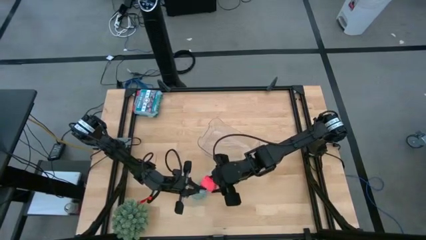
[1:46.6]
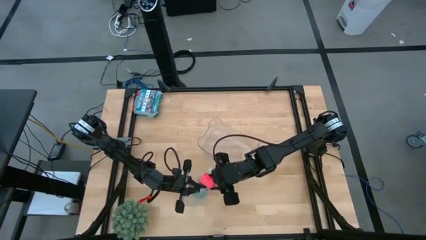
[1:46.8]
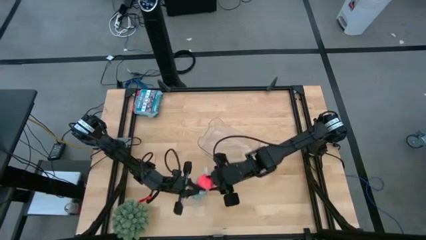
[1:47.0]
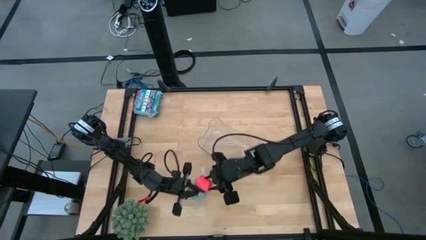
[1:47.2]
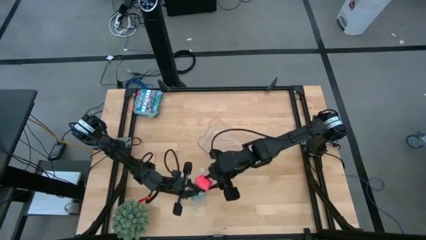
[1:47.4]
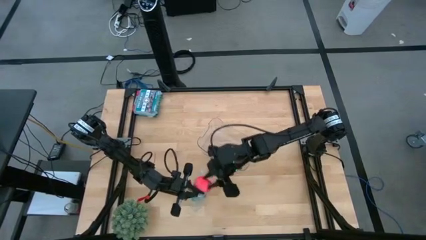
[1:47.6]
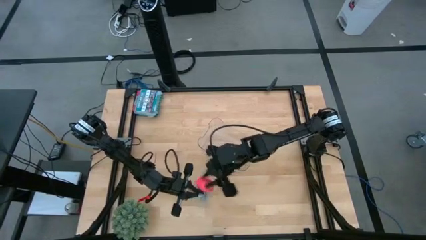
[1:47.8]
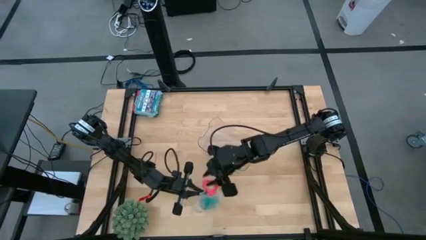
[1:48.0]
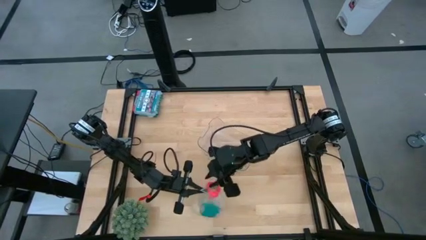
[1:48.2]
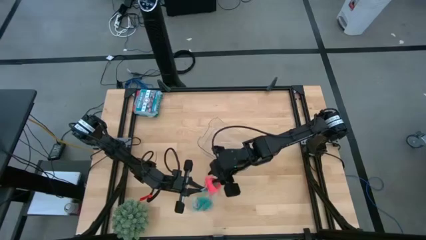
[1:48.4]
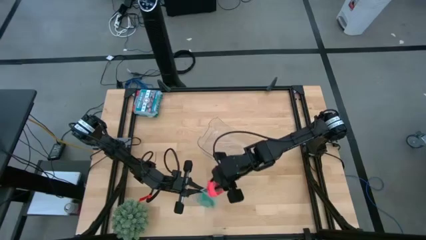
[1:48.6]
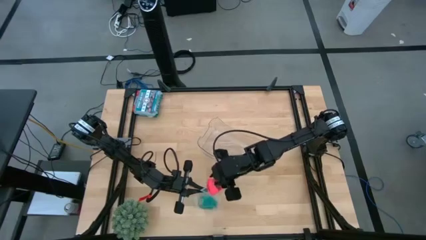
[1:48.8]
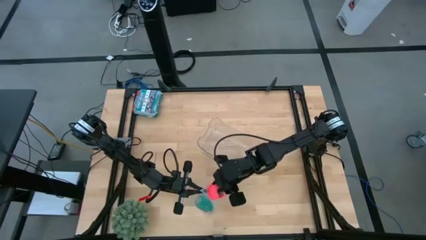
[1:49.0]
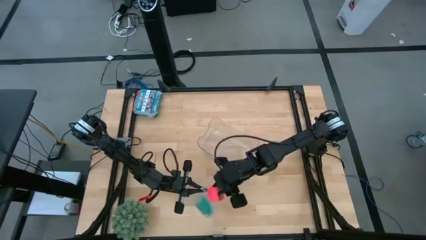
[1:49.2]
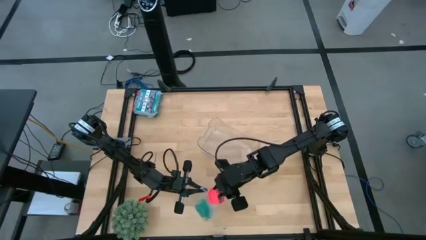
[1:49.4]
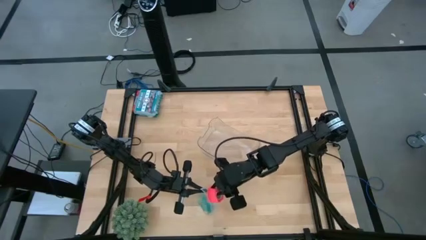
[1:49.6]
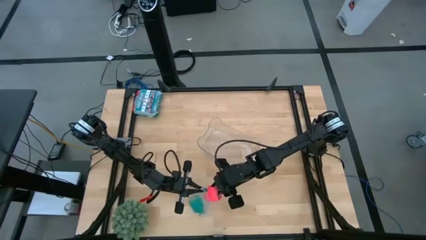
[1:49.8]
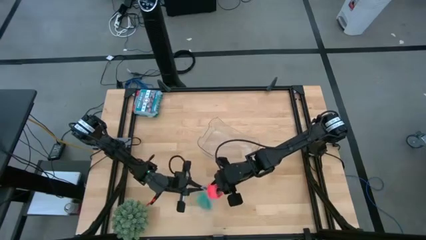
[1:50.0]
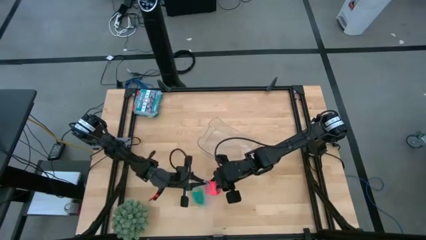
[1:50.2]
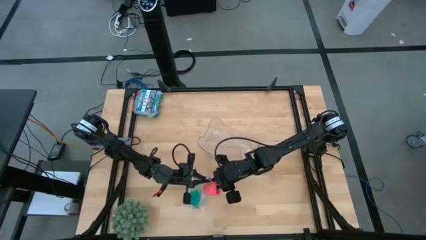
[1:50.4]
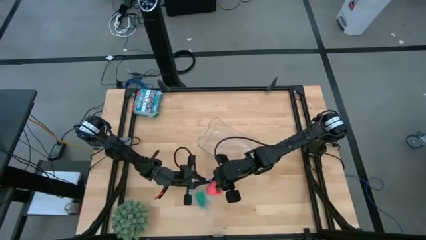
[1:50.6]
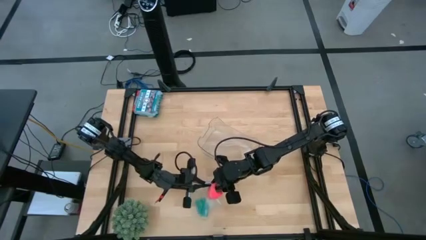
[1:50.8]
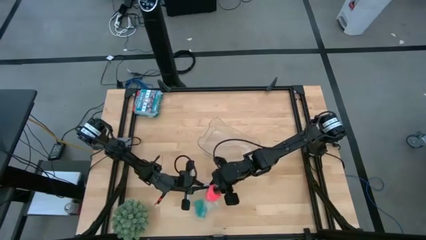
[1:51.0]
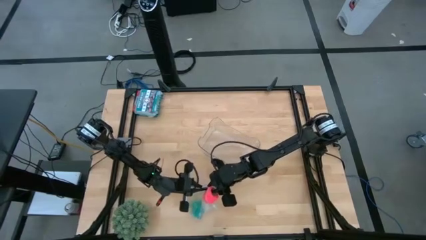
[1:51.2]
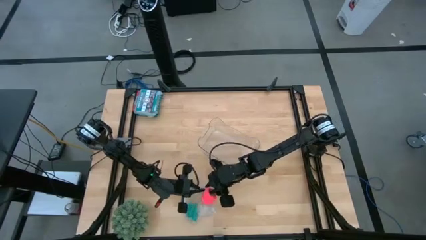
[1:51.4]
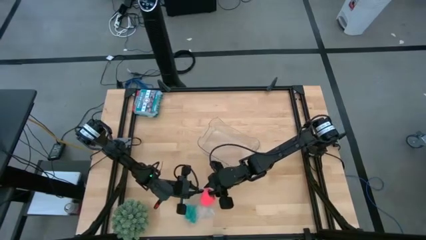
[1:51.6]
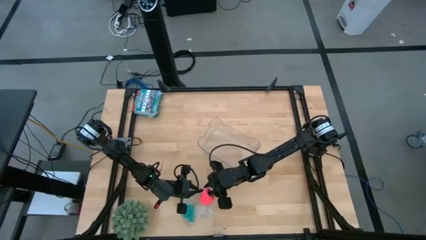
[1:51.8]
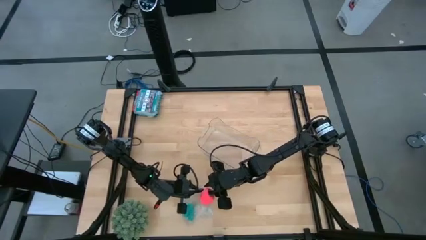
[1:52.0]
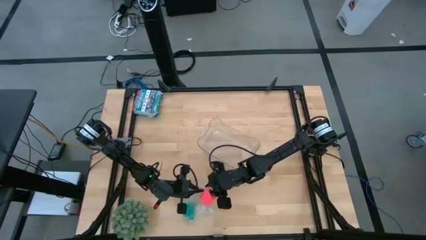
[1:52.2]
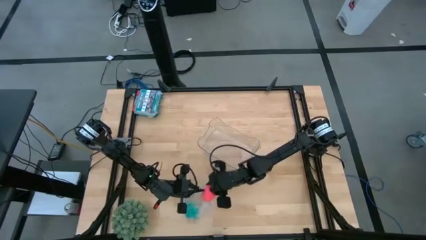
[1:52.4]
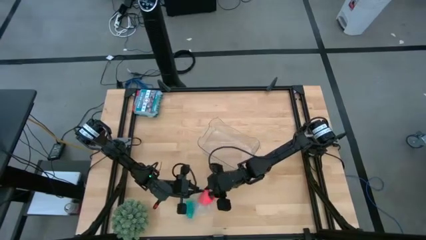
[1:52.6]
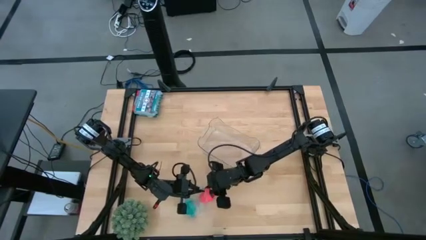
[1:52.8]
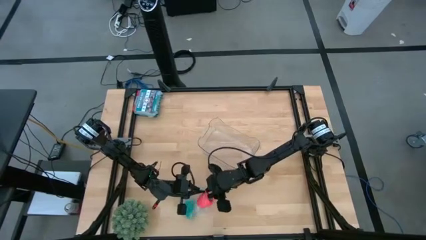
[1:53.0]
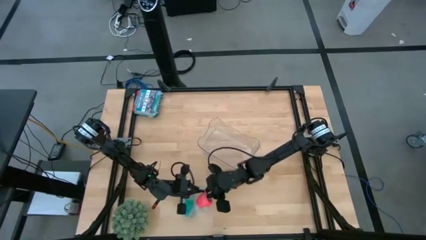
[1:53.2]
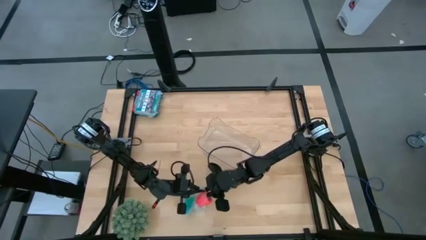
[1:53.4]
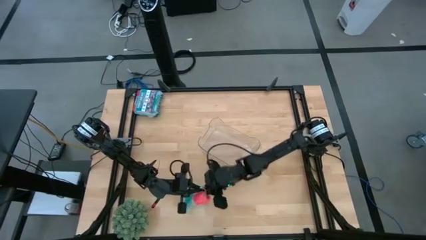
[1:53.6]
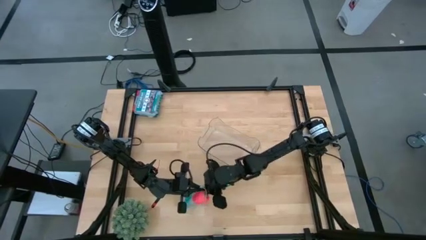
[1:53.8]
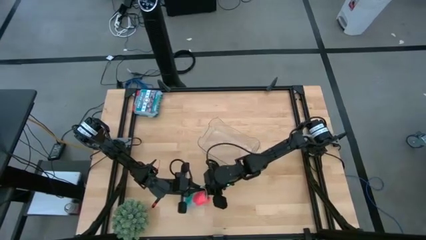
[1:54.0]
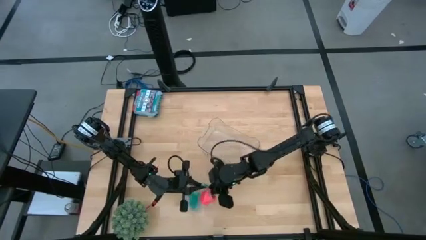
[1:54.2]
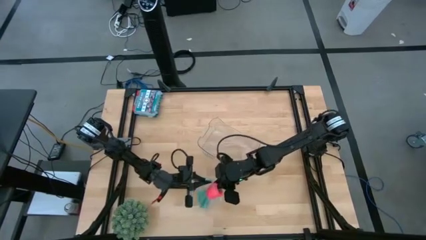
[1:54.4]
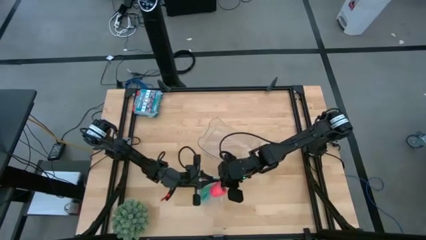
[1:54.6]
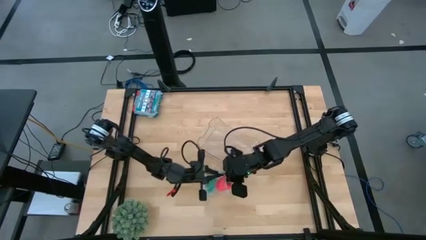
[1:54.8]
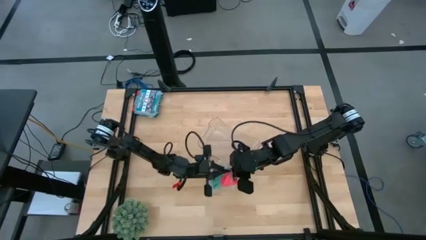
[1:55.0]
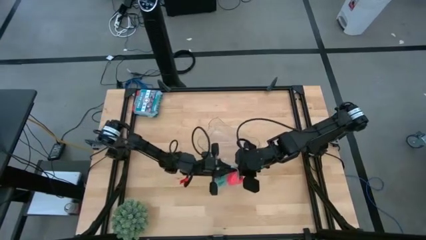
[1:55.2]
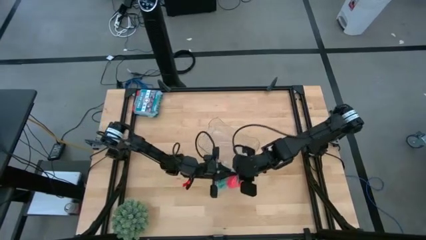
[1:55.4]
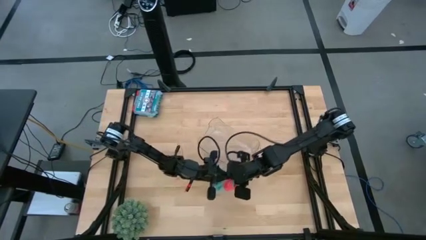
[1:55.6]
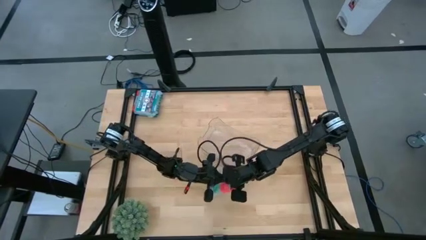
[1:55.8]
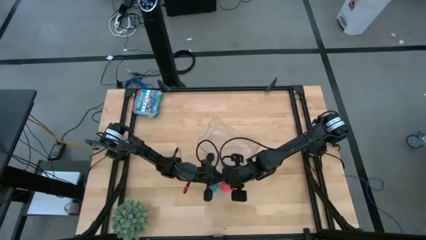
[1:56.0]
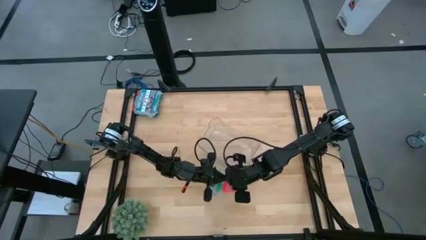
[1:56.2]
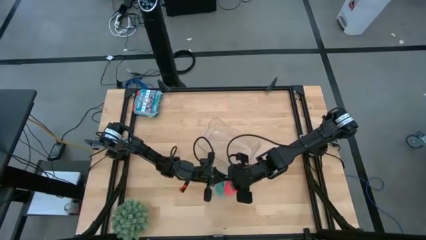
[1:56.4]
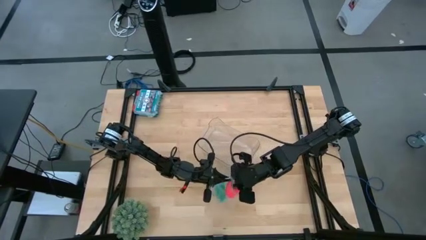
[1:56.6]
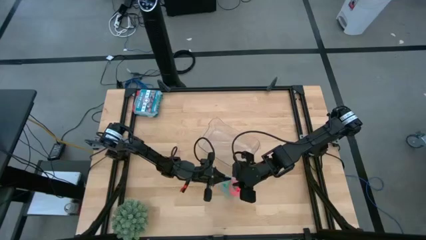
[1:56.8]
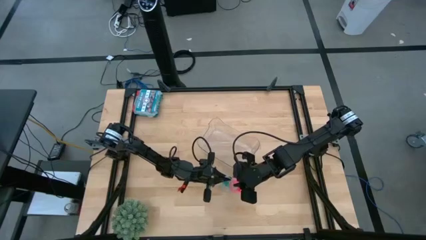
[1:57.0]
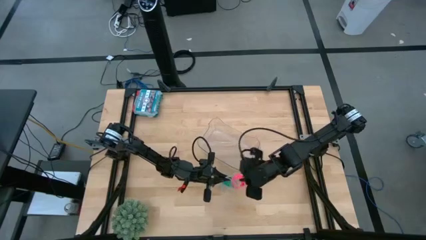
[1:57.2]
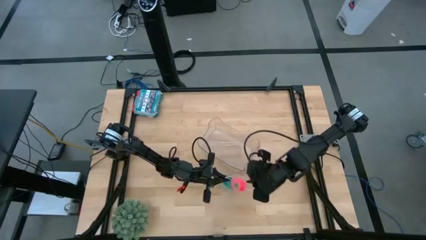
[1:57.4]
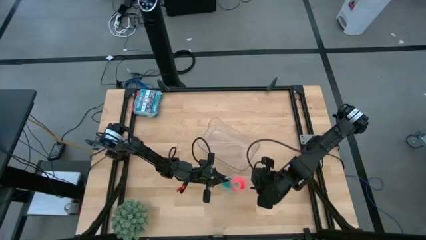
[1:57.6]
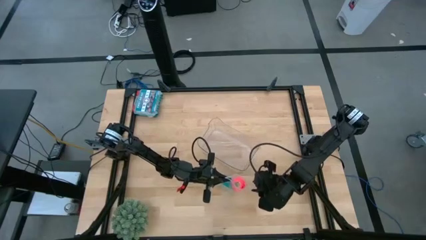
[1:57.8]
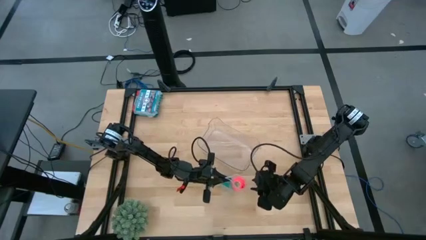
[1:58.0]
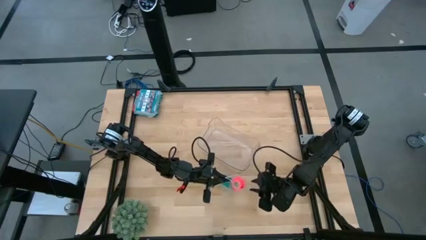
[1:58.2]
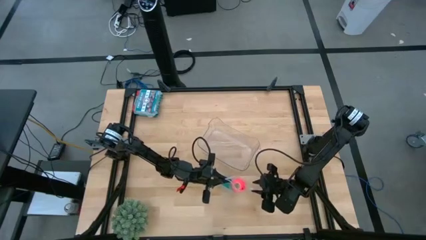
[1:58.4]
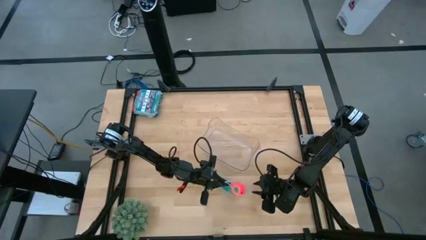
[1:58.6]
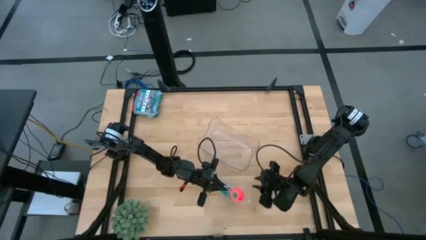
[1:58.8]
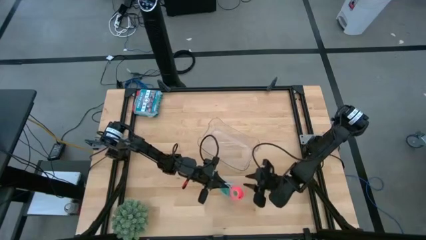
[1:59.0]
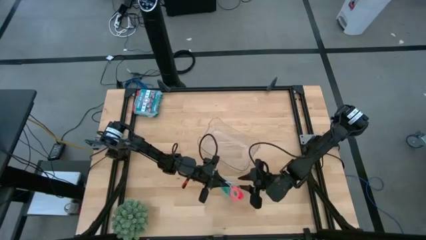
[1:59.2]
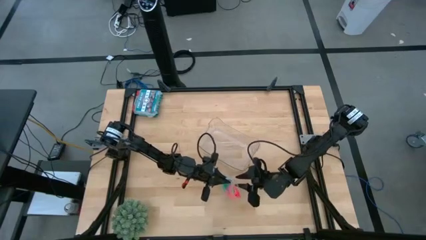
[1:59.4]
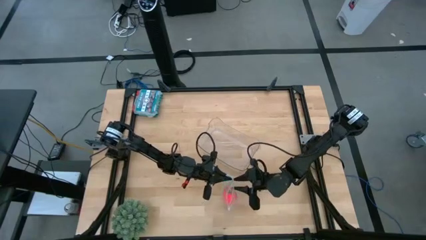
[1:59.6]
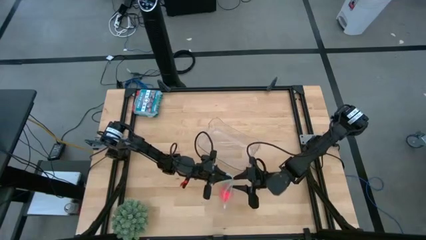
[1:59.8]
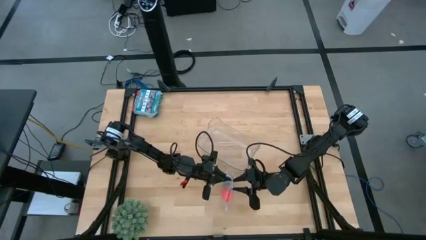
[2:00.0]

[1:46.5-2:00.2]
Task: Roll bandage
Put the pink bandage into the transparent zip bag

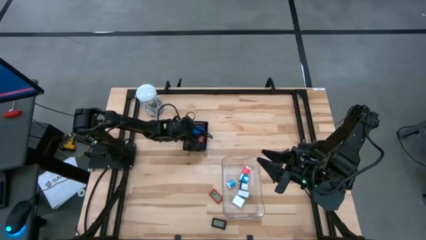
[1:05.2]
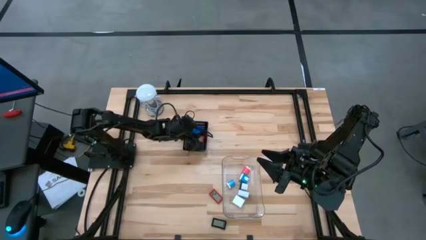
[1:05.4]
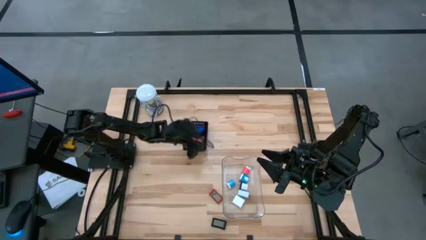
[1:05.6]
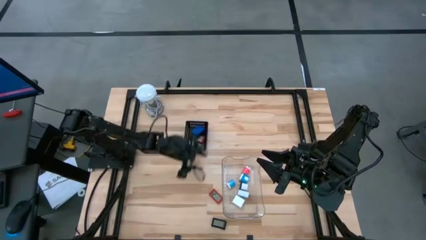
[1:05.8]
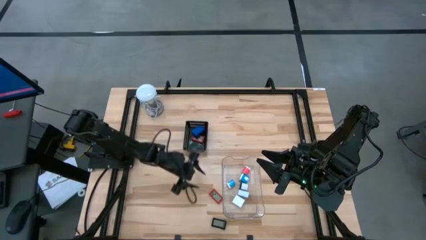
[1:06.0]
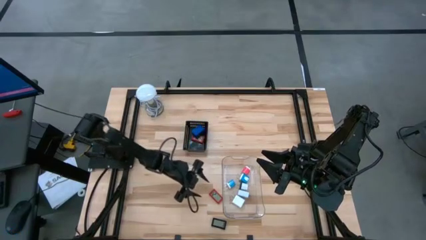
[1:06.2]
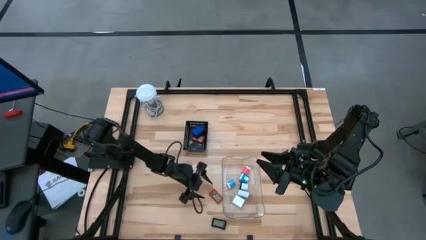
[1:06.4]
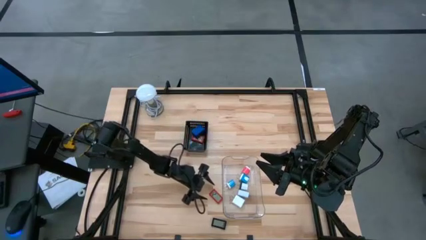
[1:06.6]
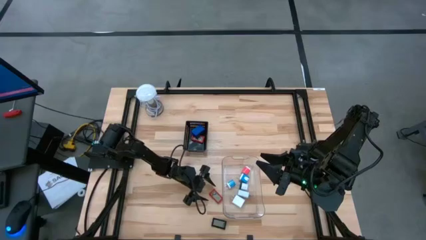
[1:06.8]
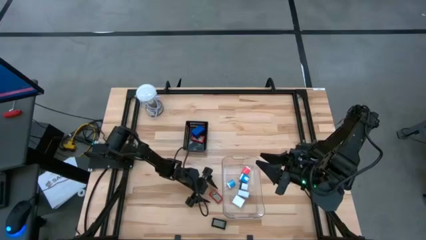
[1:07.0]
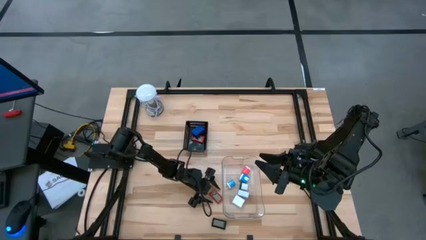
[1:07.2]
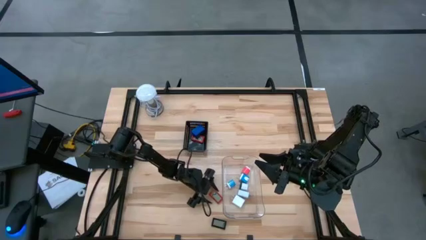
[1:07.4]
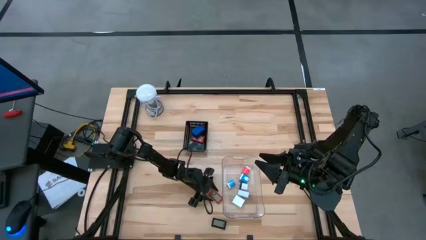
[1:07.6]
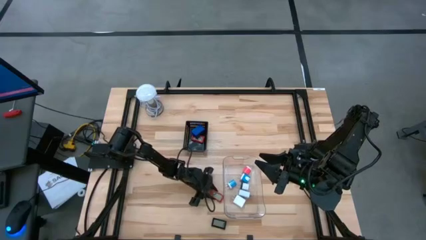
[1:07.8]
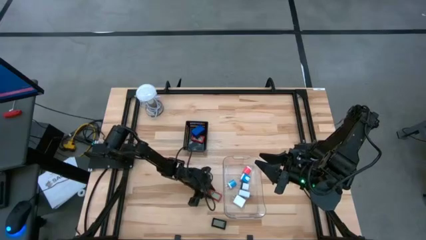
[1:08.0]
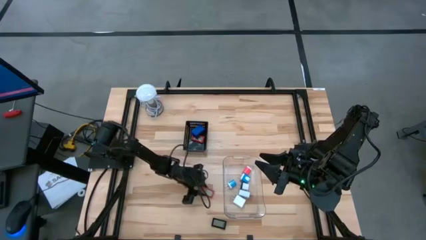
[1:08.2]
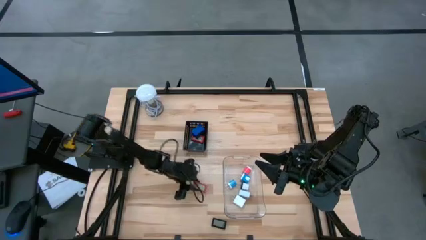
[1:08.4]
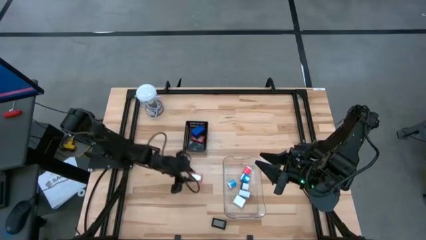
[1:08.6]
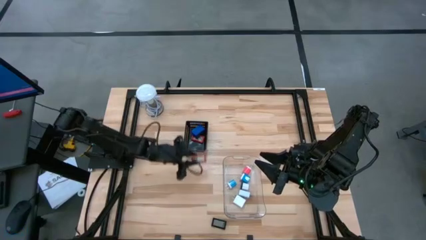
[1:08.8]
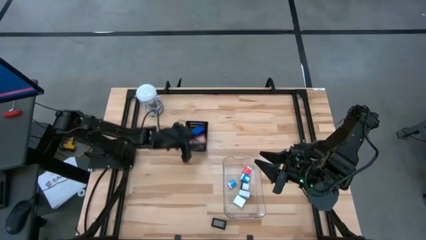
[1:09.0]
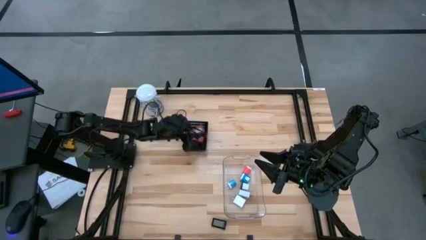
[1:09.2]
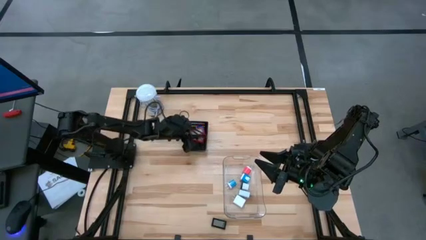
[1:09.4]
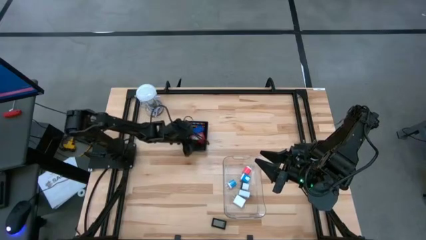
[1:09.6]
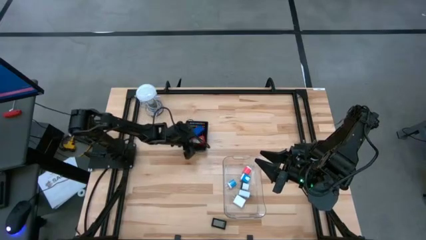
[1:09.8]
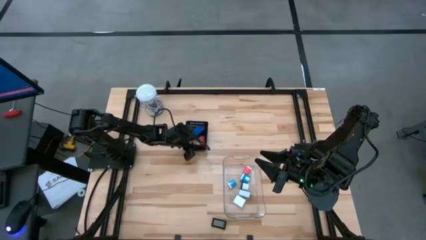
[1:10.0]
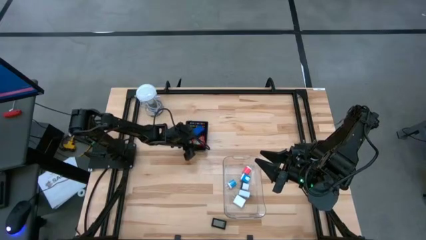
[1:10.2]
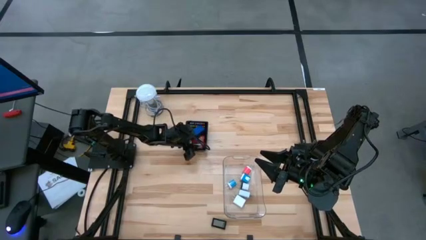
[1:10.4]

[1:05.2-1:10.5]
Task: Pick & Place Office items
Put the red digital clock into the black bin
